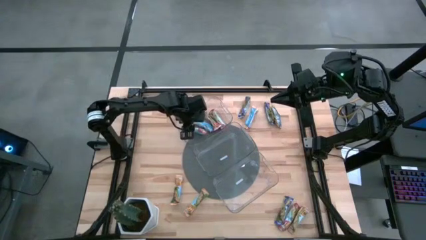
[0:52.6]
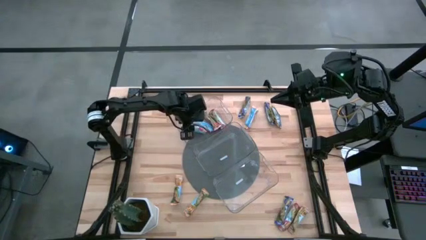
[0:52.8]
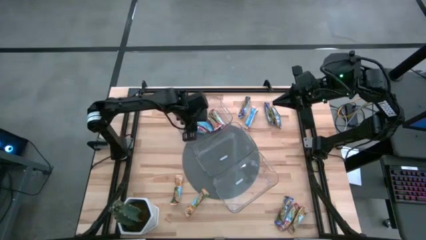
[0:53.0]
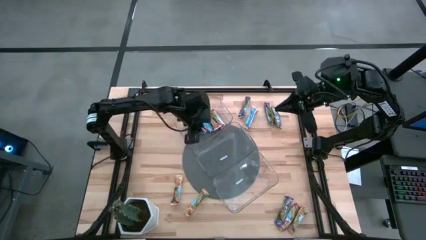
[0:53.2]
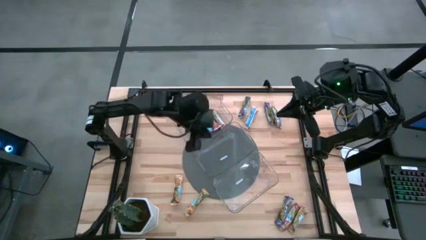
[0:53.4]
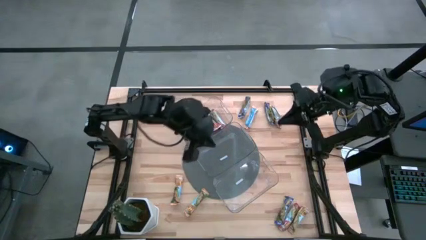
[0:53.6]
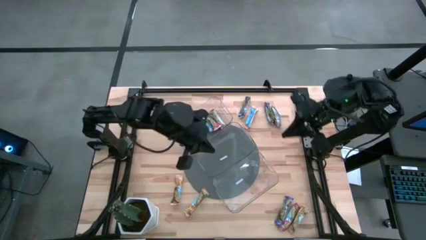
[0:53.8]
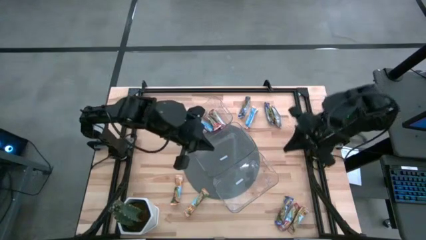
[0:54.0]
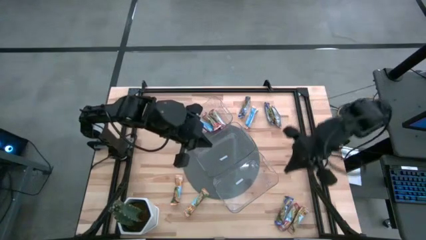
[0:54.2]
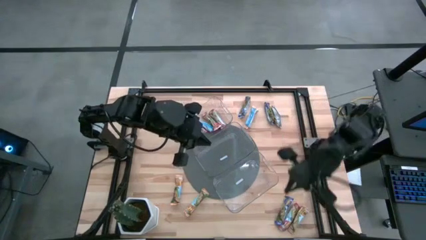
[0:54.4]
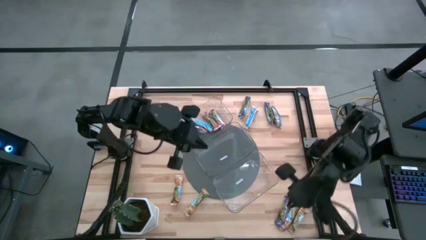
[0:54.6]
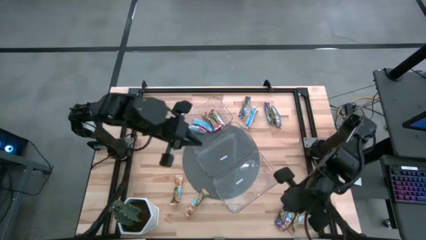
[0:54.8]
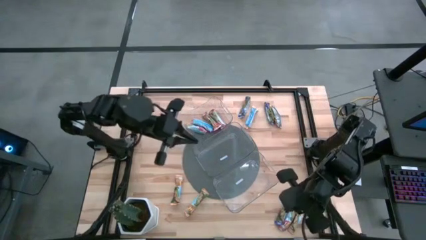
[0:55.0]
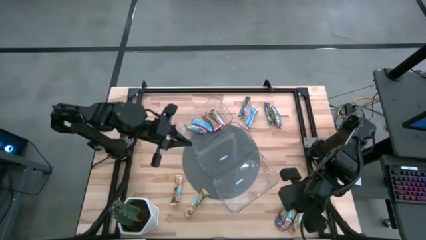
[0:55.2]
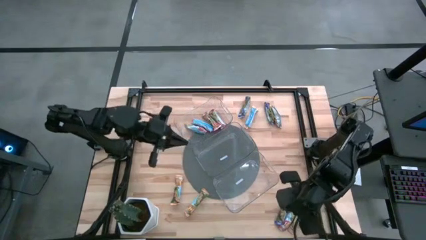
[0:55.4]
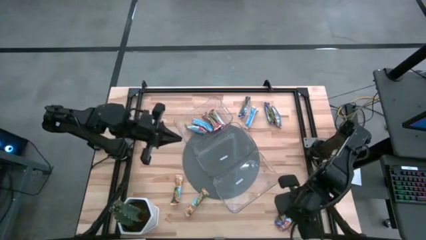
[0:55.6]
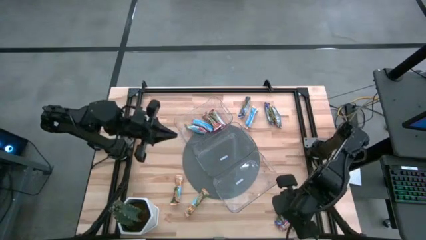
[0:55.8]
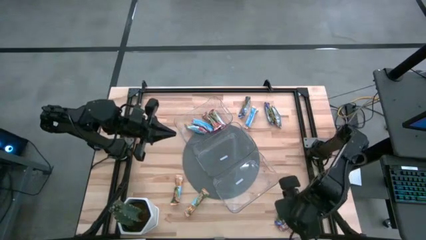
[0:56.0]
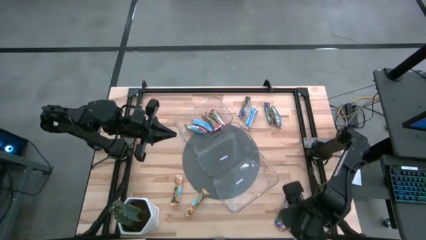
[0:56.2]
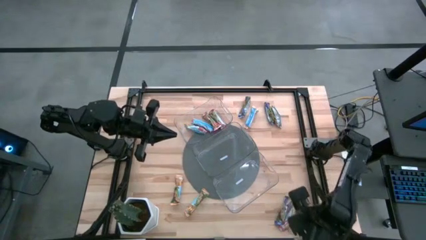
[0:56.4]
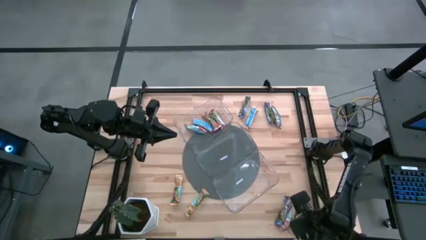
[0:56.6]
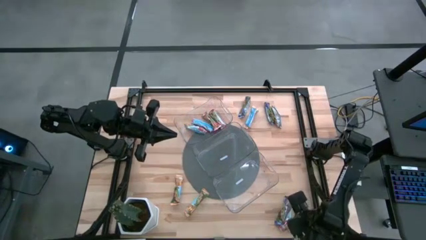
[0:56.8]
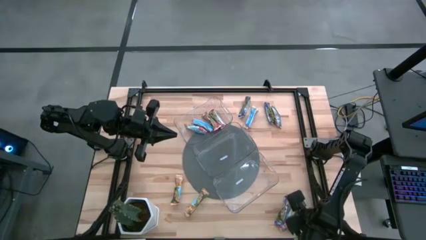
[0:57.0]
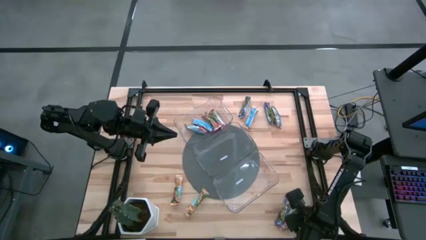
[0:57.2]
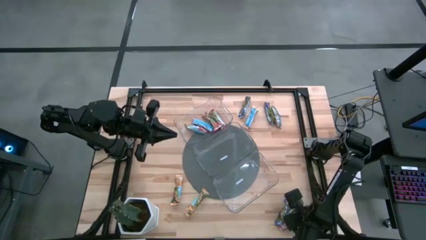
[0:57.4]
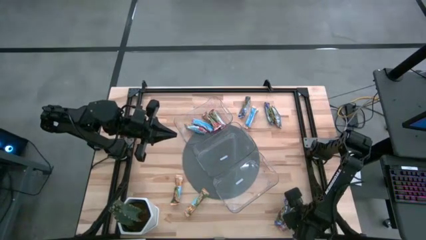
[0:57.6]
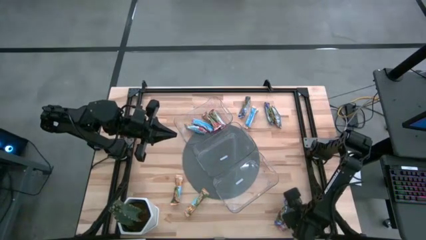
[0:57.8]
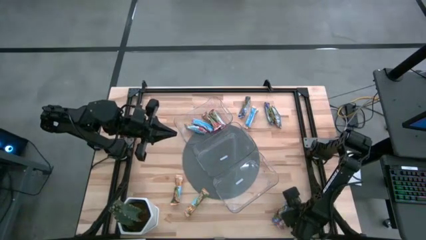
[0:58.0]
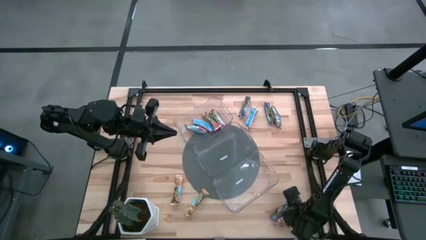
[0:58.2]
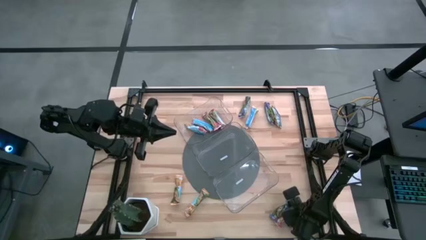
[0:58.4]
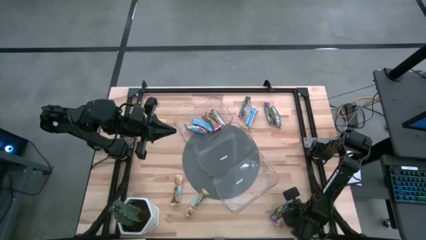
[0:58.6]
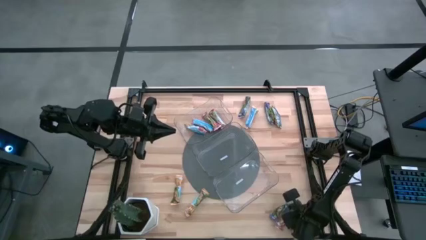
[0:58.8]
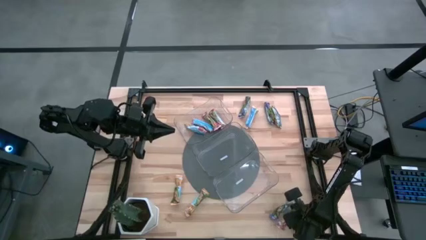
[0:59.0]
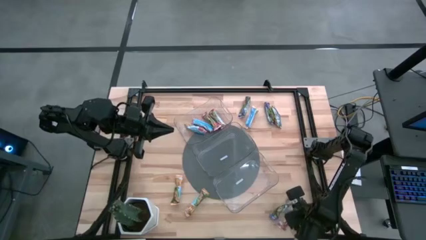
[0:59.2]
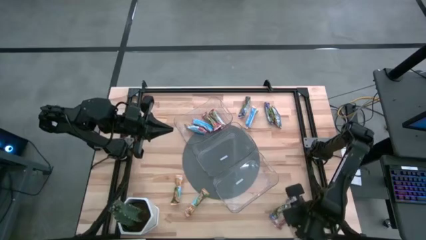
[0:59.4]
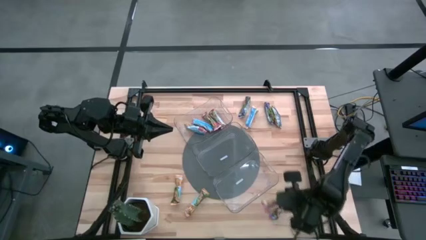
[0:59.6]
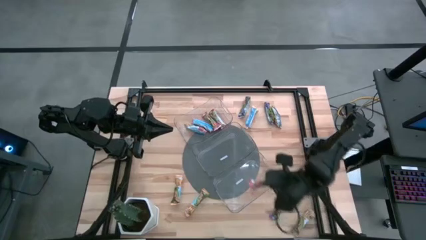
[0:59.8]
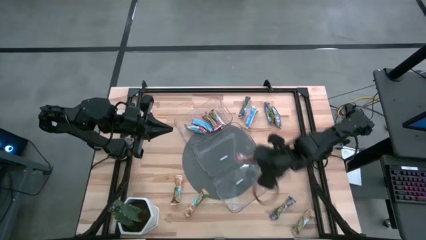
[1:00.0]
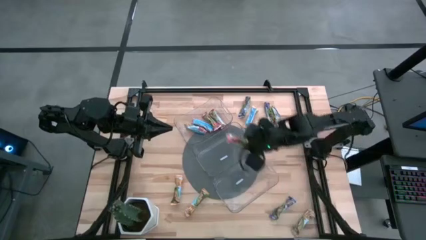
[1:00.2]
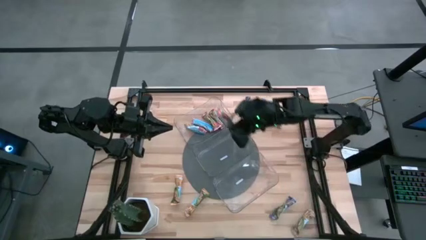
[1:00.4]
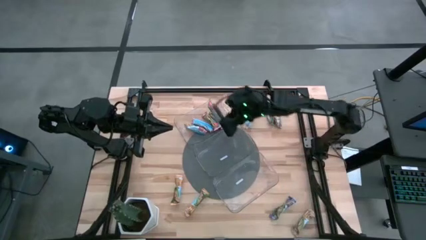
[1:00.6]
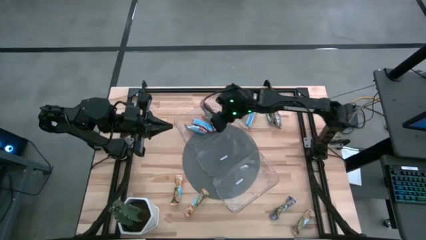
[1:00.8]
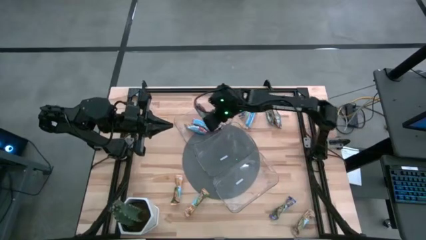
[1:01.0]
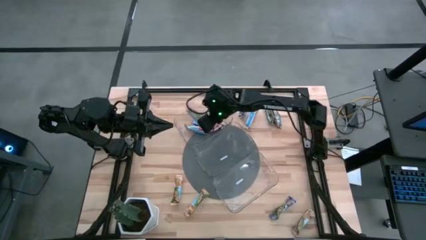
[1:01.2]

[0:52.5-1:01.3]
Task: Pick and place Granola Bars by type
Put the red granola bar into the top transparent bin

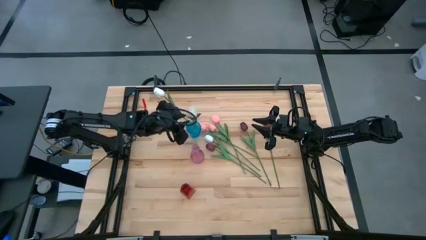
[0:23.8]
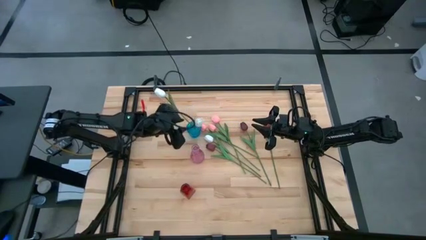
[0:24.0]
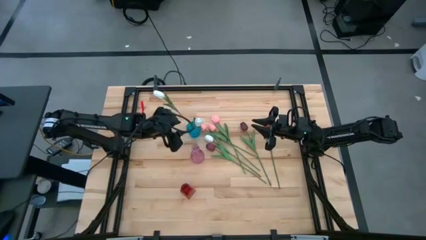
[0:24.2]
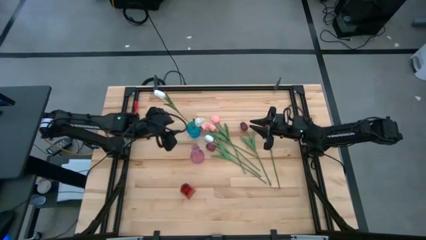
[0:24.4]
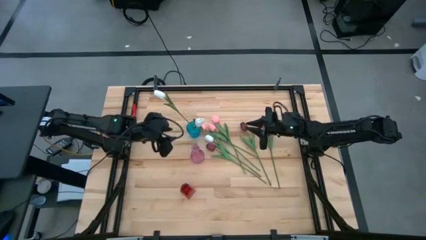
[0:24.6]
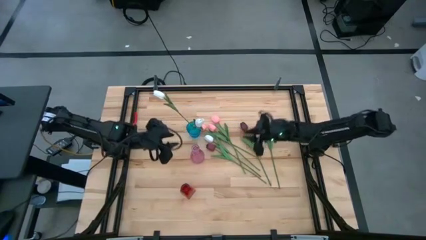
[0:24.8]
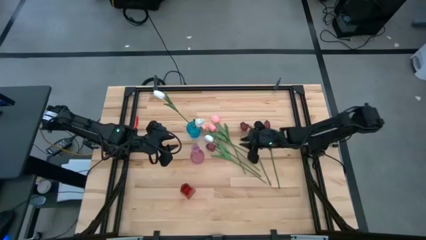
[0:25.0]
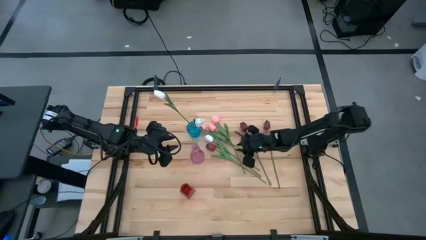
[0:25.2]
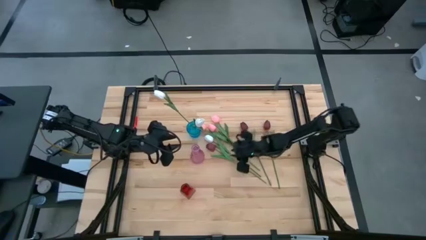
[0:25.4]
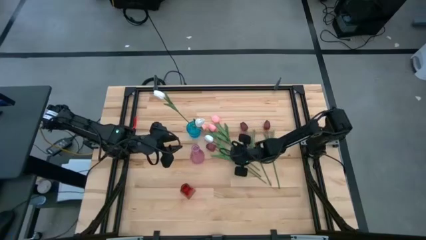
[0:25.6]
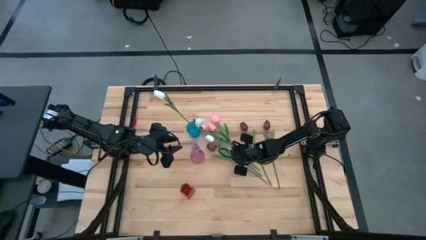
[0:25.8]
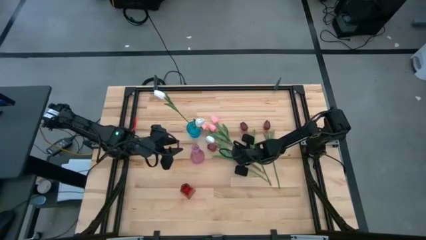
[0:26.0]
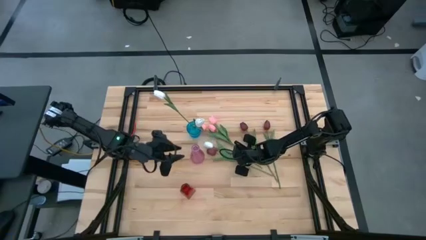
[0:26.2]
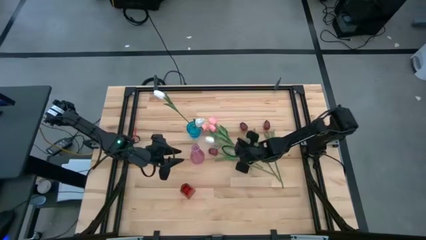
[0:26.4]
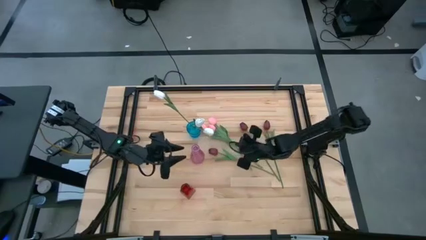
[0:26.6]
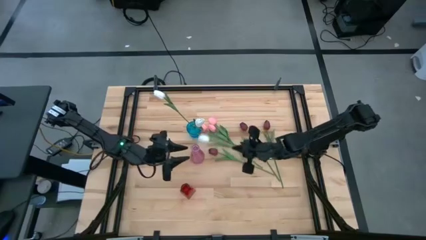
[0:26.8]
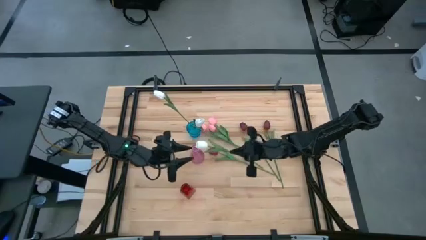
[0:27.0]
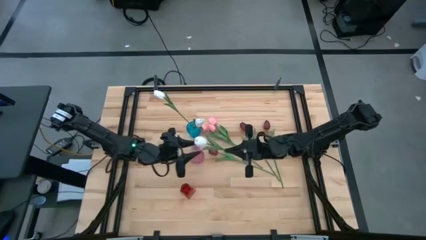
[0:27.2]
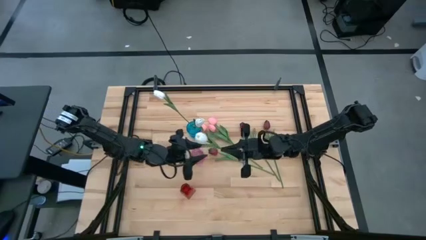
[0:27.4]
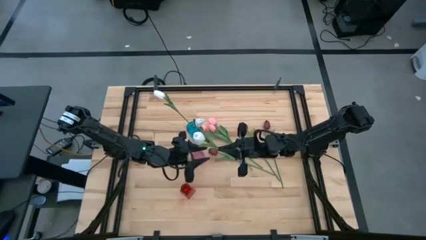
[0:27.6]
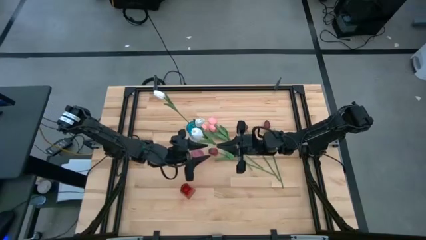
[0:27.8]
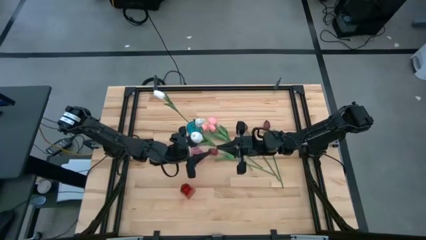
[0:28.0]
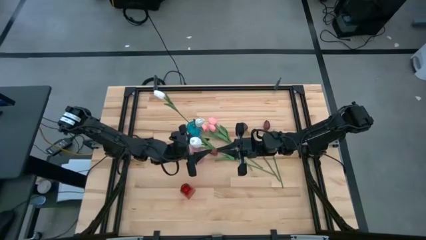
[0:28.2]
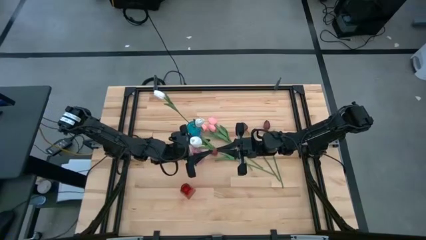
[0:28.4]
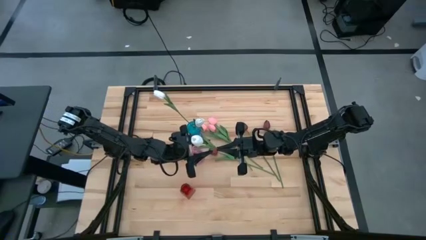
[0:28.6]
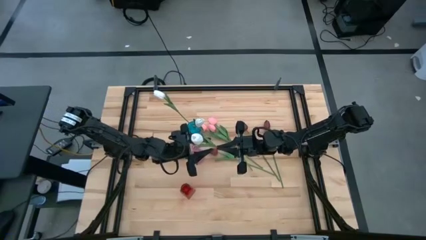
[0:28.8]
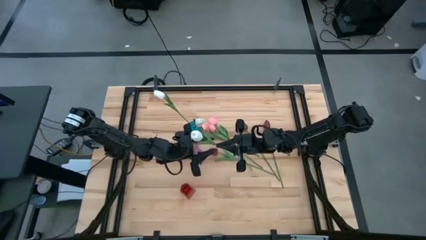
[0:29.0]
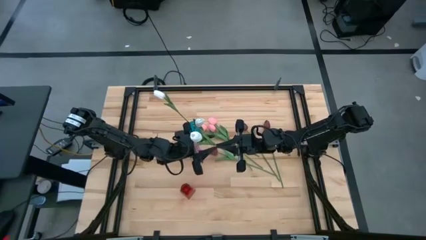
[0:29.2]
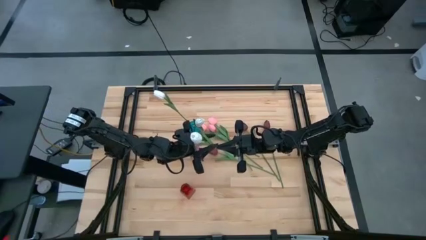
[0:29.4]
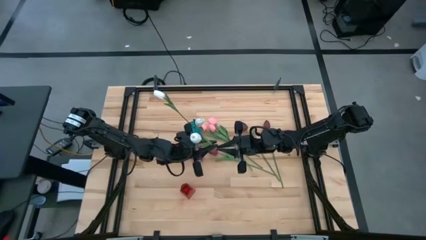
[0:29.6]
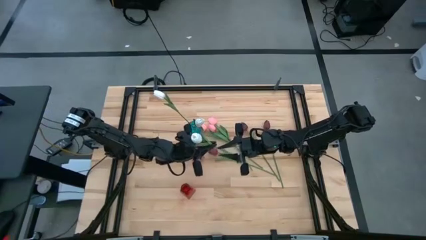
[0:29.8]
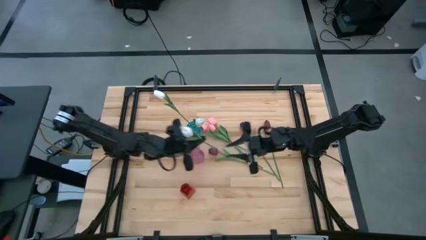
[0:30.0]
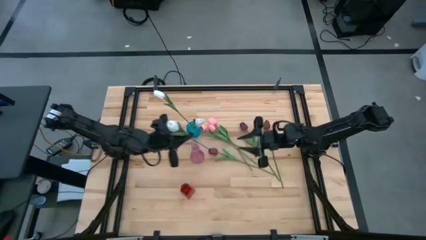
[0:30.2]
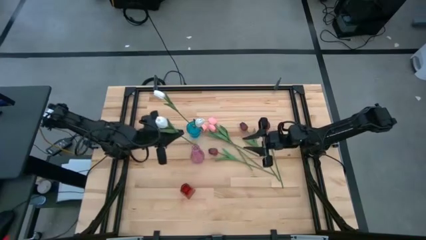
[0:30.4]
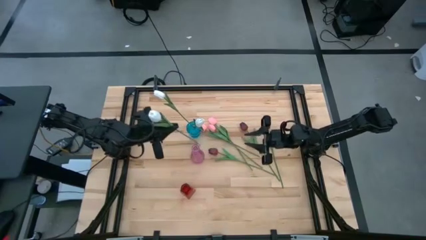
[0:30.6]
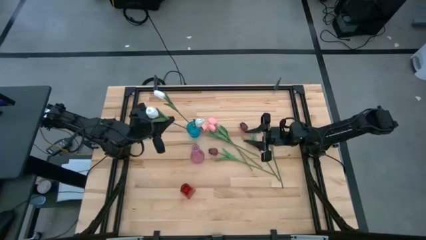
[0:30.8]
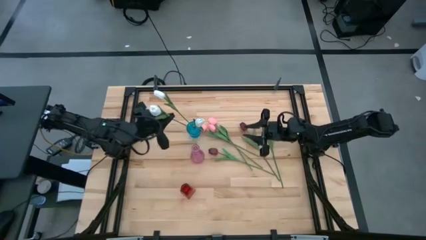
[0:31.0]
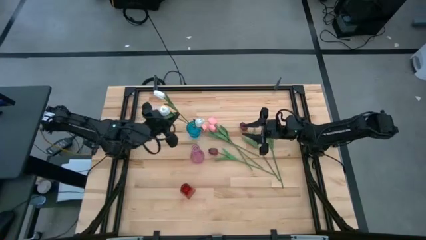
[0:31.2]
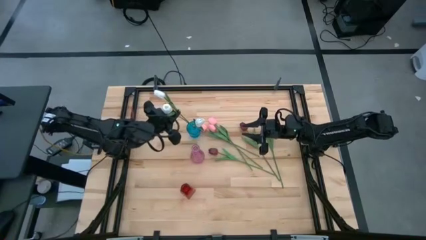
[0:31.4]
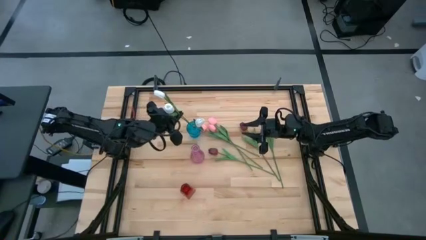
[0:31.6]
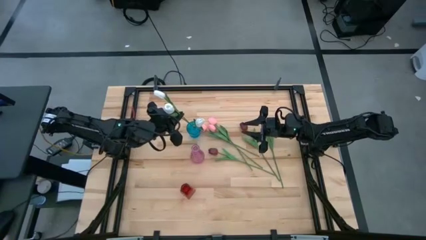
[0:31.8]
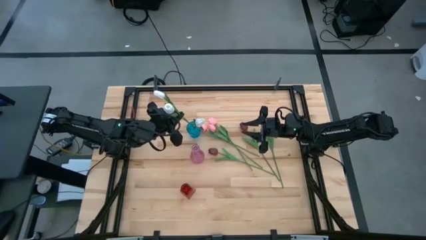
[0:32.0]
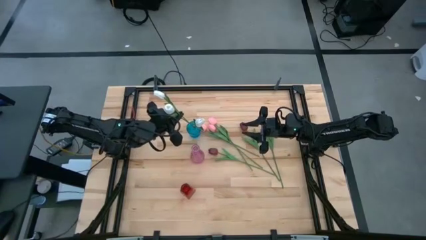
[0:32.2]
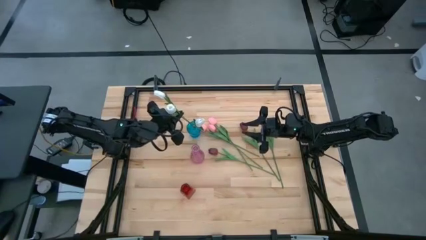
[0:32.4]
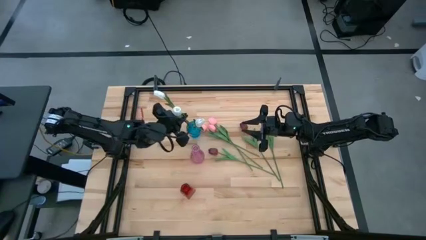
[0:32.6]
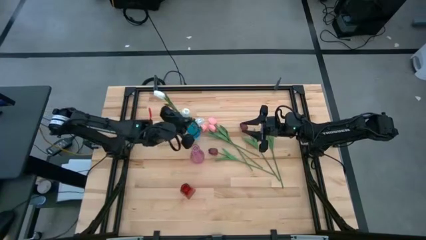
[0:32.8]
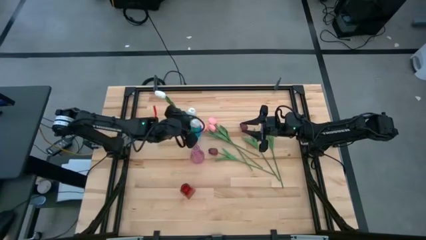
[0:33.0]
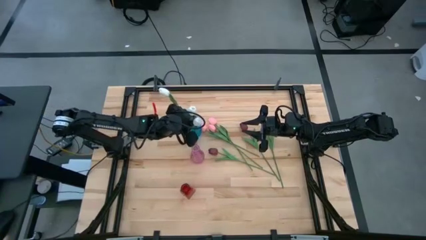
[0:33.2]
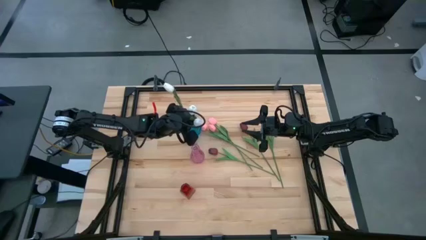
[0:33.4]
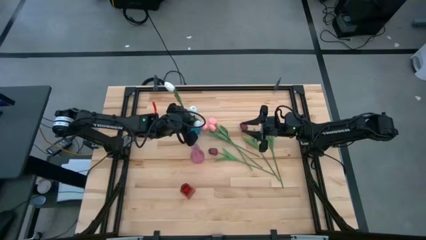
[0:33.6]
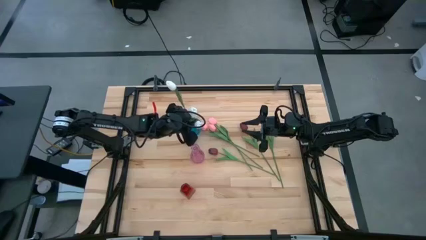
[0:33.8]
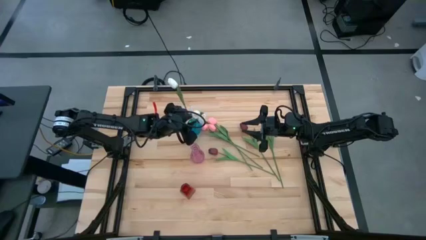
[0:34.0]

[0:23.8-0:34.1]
Task: Sort flowers into vase by color
Put the white tulip into the blue vase
